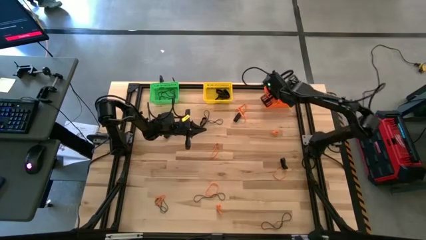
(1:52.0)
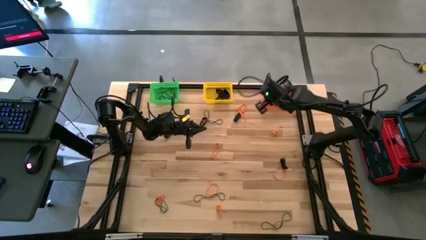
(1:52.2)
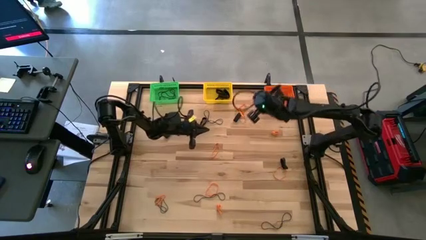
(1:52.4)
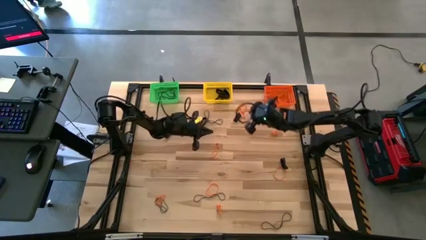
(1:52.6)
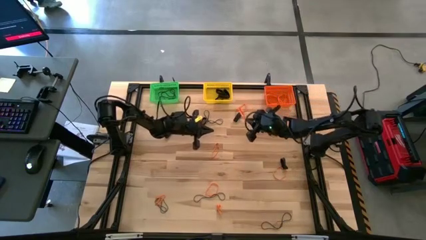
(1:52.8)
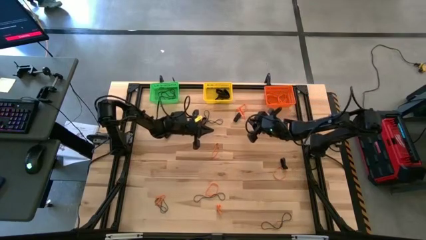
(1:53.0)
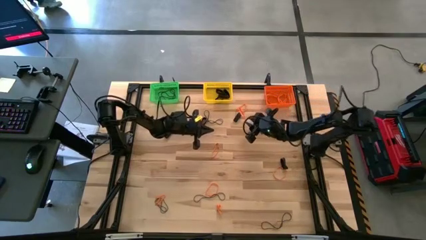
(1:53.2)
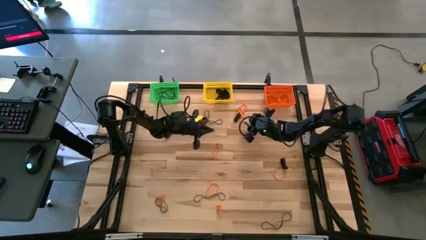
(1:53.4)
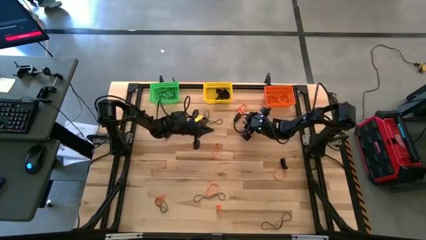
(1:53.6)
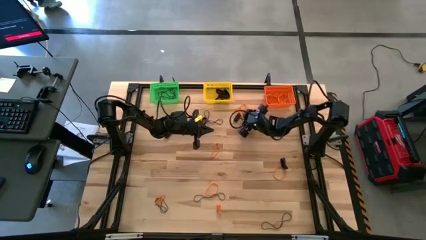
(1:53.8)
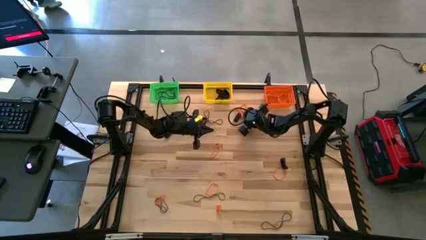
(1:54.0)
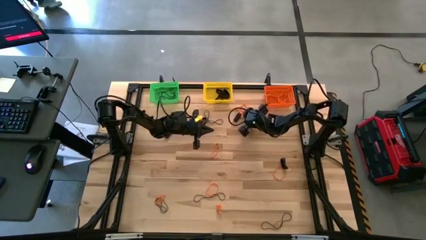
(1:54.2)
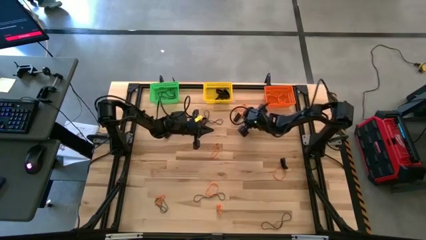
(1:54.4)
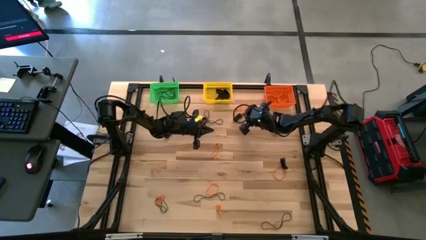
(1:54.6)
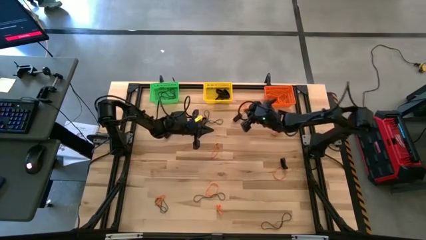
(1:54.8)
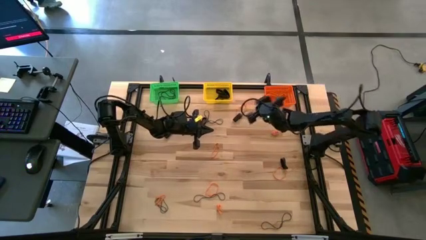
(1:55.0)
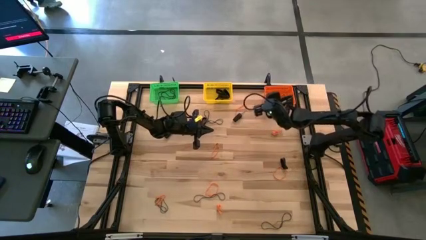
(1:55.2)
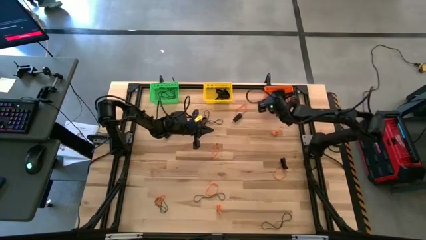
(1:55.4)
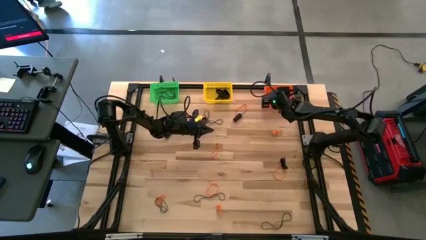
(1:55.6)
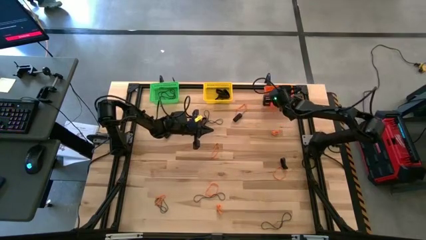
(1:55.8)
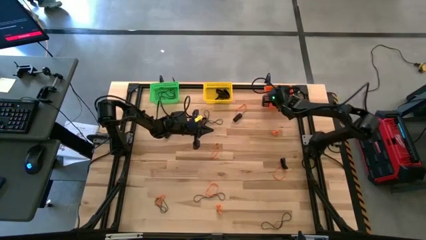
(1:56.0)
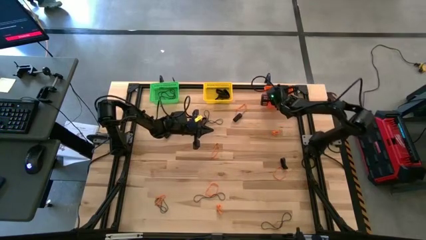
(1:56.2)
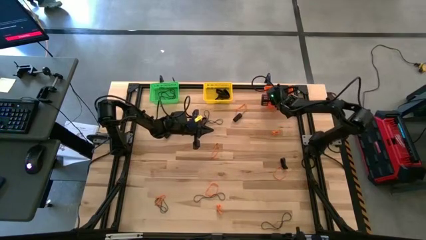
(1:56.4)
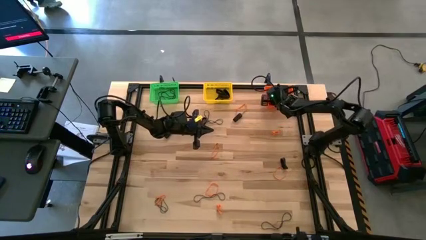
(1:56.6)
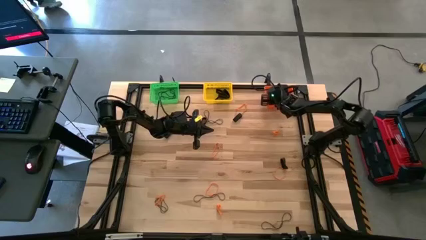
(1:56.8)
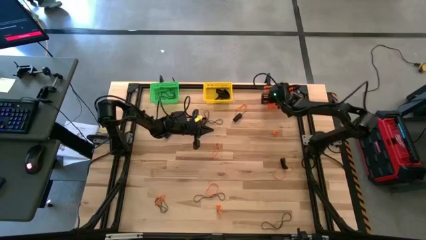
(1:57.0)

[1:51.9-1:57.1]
Task: Sort rubber bands into baskets
Put the orange rubber band into the orange bin

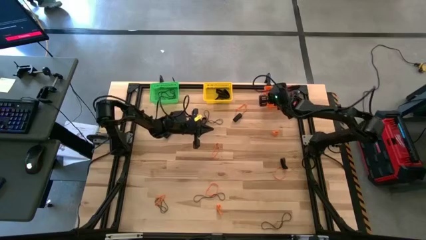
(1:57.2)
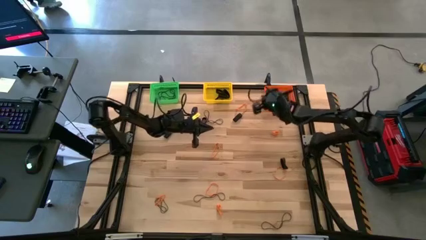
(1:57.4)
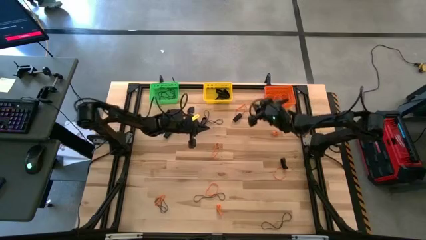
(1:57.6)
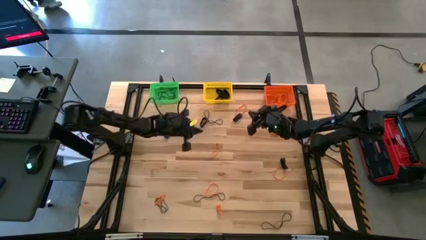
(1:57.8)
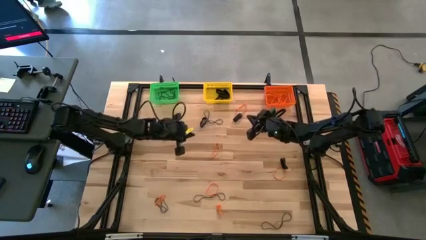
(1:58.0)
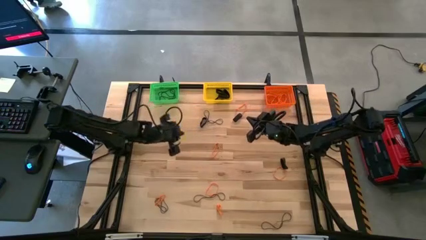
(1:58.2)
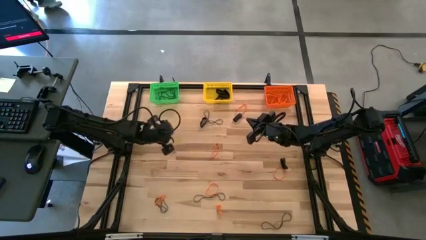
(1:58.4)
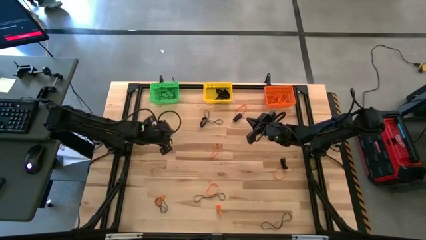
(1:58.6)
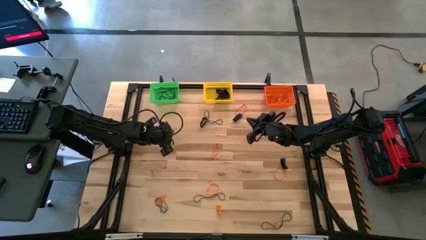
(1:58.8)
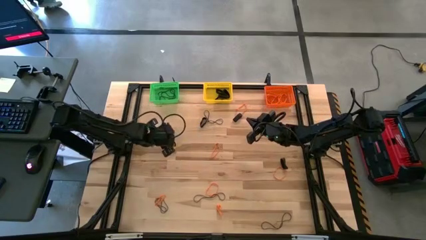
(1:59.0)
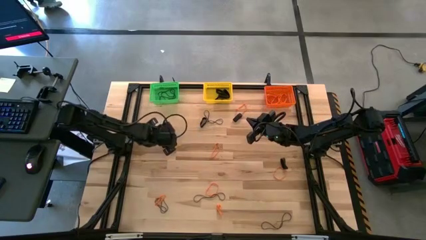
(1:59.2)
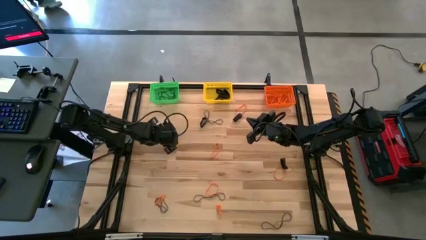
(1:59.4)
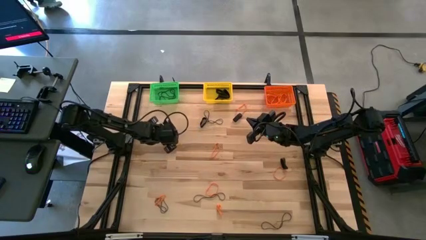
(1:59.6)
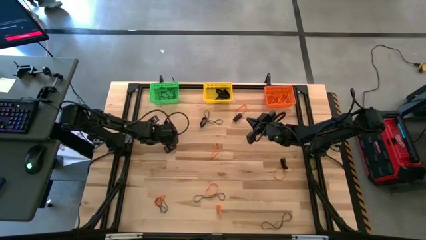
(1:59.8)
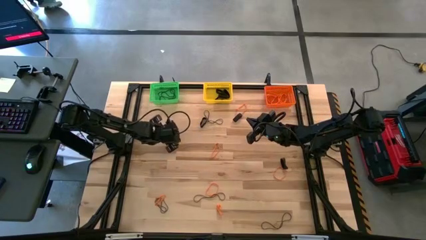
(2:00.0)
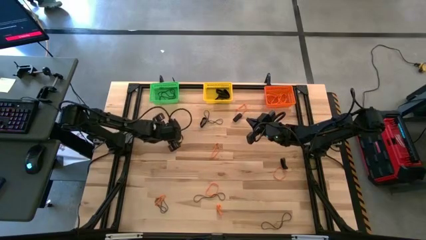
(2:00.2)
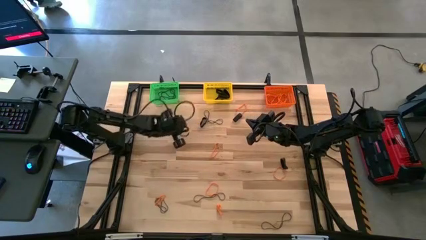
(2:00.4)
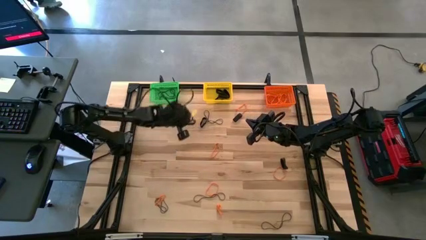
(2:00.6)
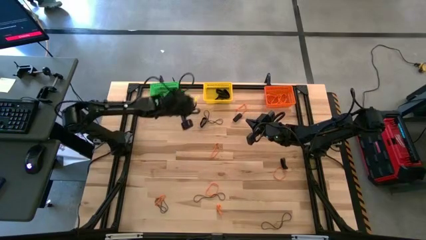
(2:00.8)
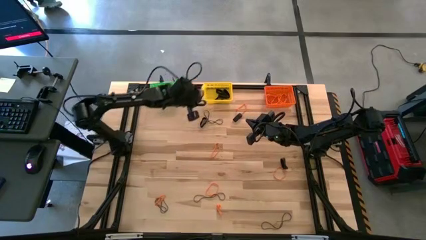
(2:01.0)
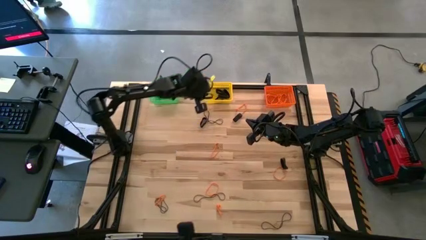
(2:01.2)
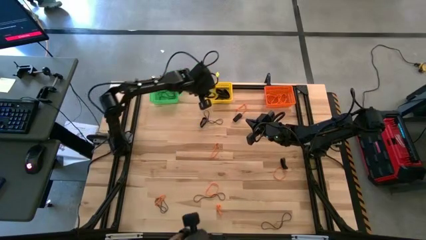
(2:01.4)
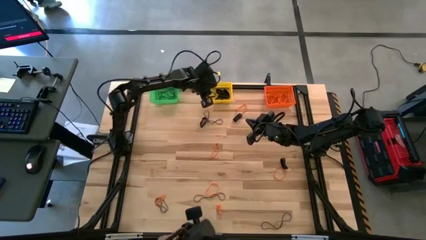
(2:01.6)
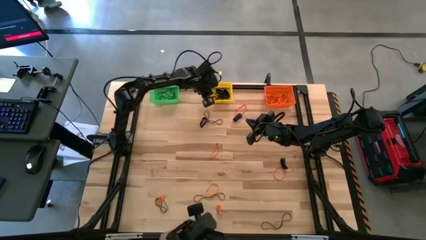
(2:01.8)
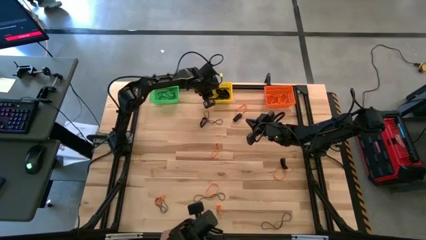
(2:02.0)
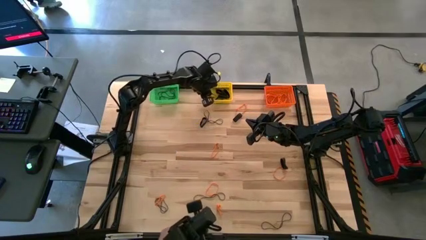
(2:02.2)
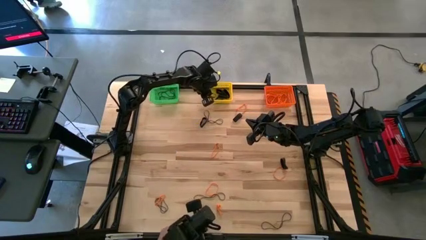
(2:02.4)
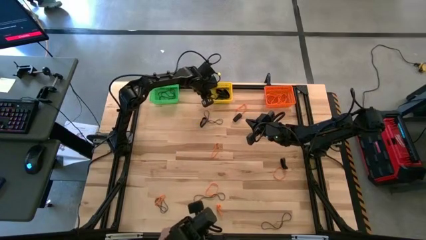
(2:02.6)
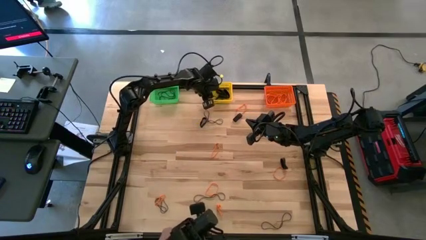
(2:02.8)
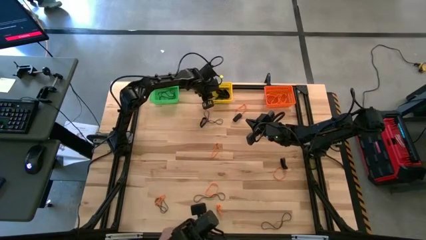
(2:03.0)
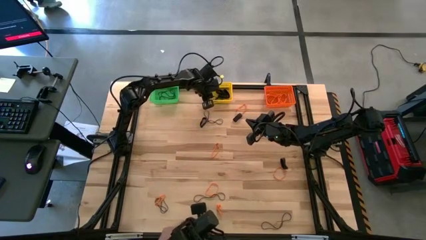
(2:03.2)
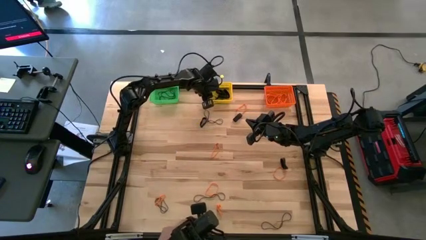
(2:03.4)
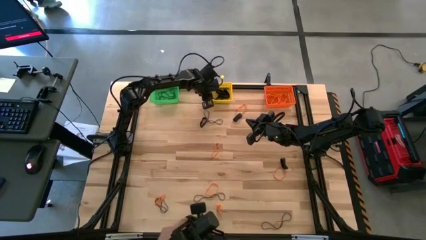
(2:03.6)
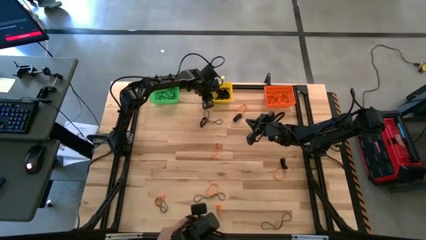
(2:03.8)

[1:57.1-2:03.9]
Put the black rubber band into the yellow bin

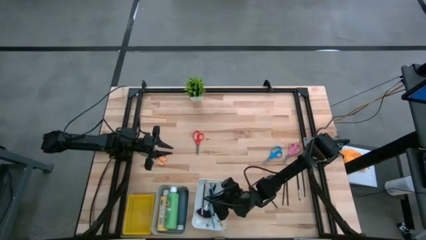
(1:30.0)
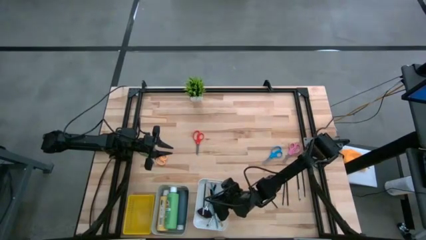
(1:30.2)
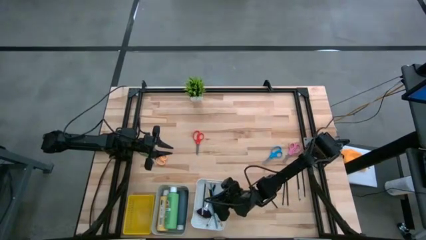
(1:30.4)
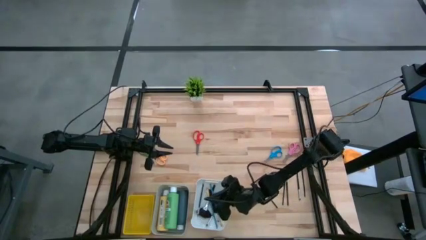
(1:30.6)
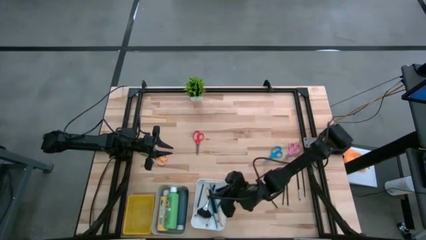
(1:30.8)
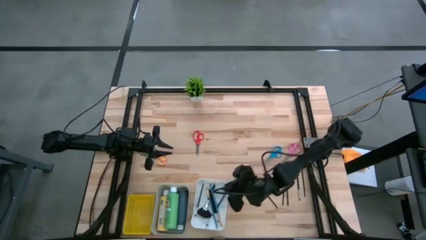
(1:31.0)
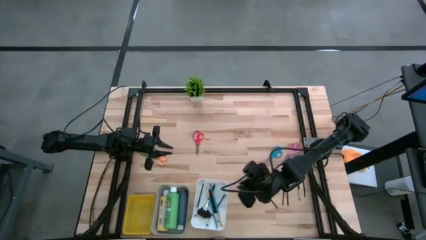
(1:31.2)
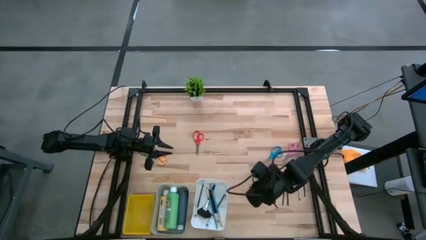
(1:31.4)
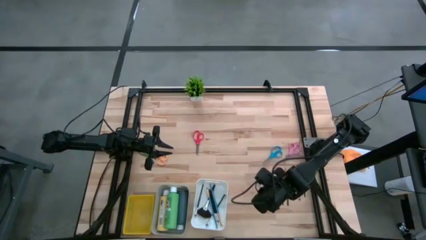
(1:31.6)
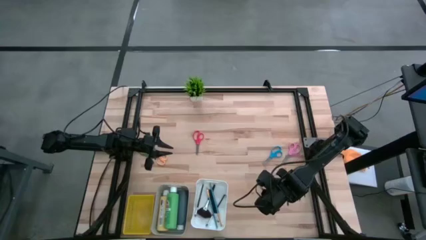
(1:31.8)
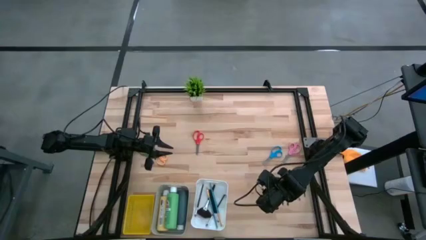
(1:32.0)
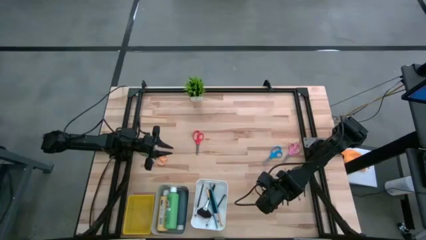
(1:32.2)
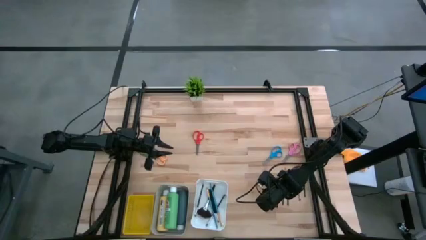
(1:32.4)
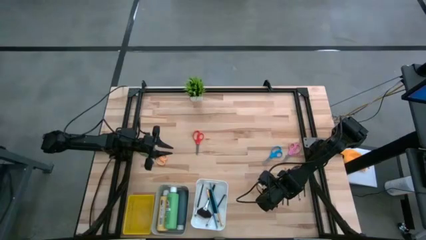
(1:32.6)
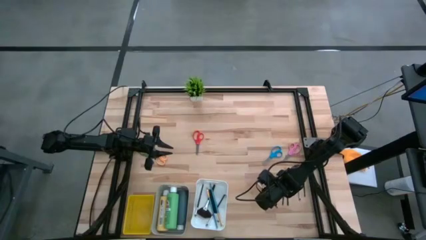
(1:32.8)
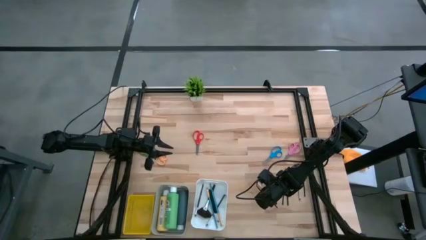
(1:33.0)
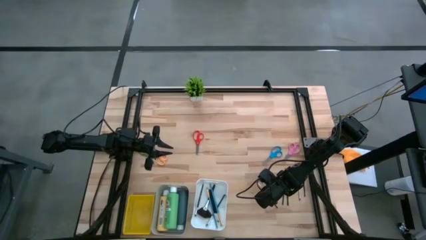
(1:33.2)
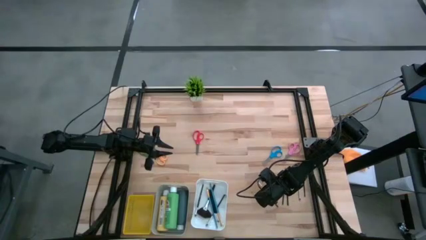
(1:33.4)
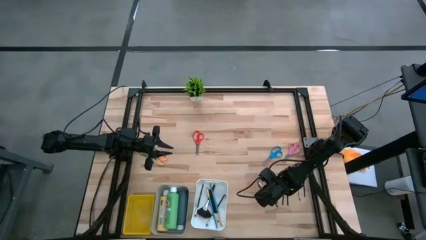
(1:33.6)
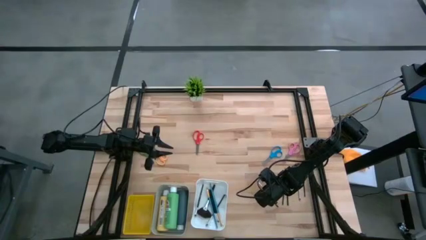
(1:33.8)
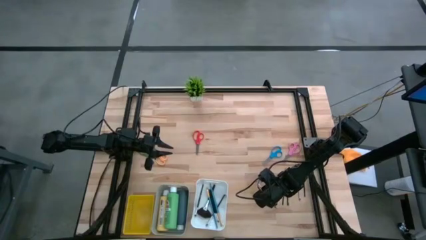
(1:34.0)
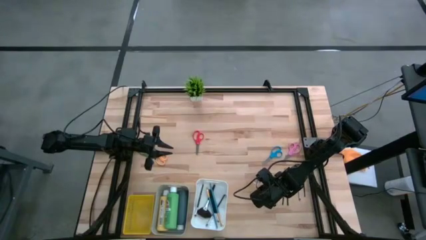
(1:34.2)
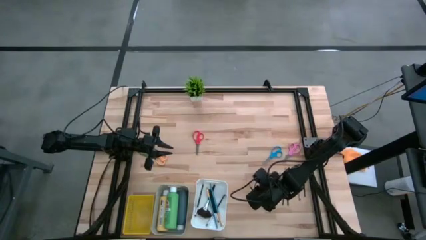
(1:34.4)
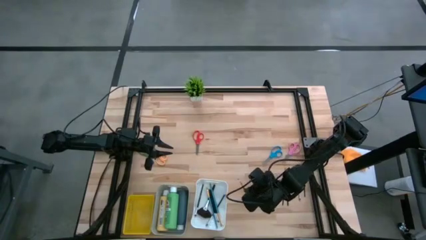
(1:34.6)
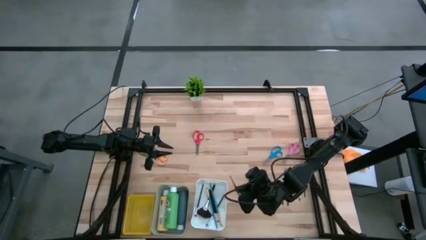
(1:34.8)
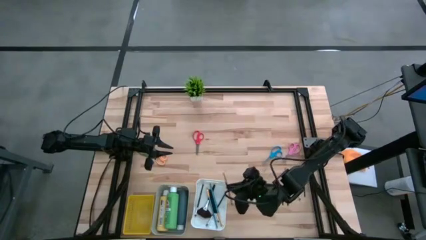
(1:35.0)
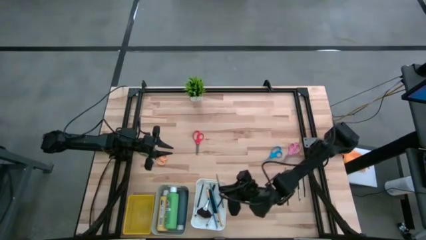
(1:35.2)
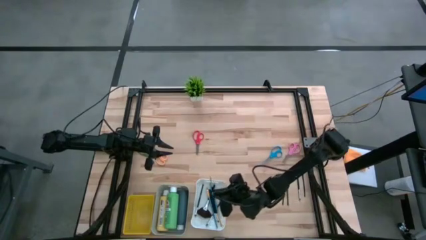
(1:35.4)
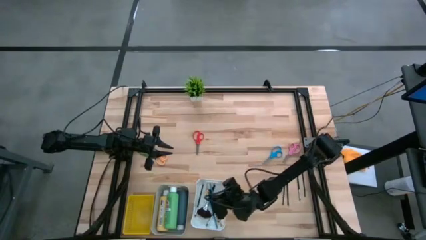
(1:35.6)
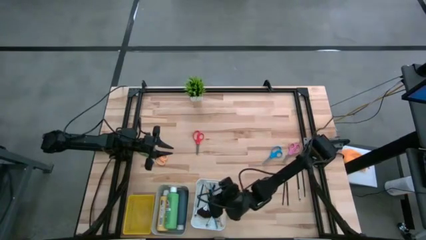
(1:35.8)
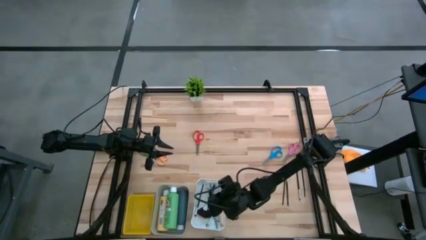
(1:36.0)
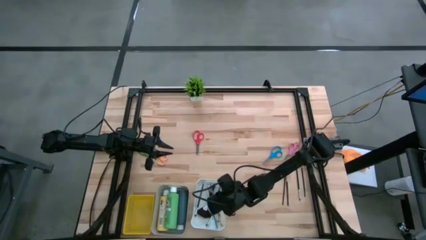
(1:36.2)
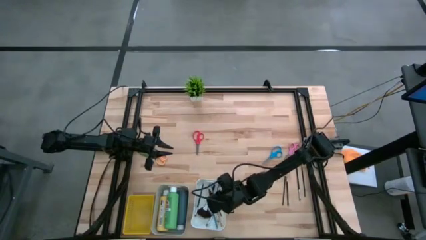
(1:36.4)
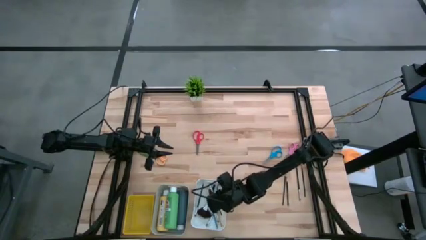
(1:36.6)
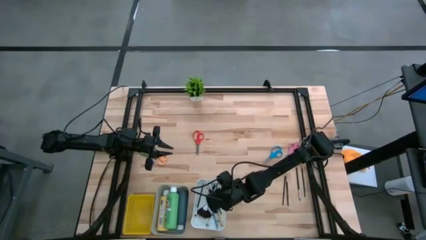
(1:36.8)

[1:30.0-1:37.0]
Task: Pick & Place Paint Supplies
Put the black paint brush into the white bin
